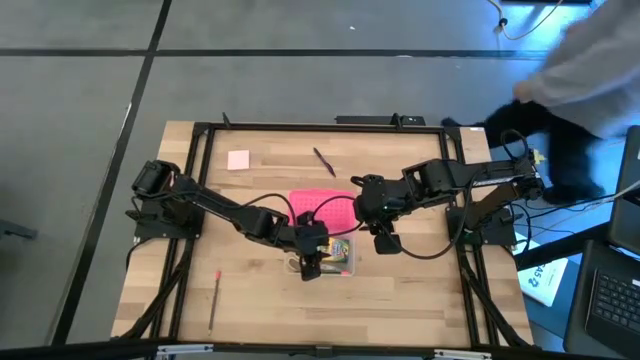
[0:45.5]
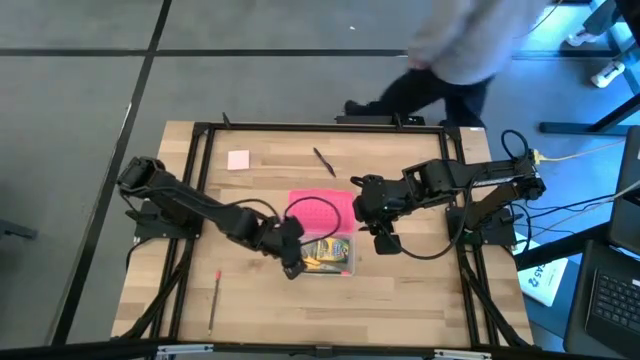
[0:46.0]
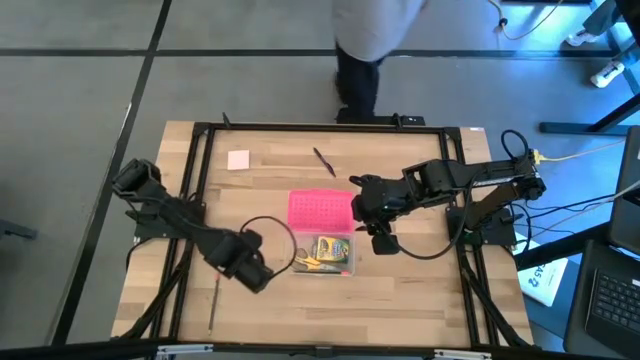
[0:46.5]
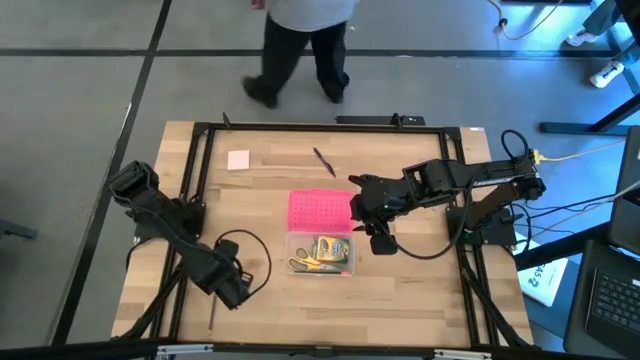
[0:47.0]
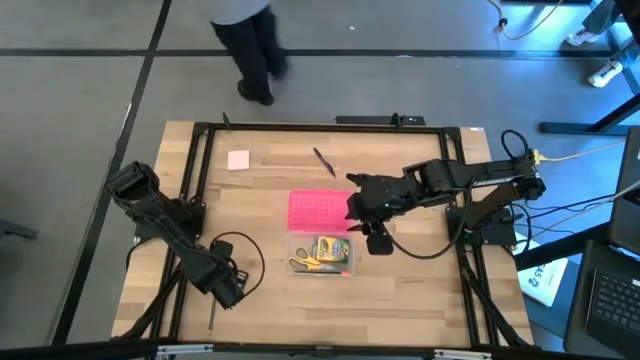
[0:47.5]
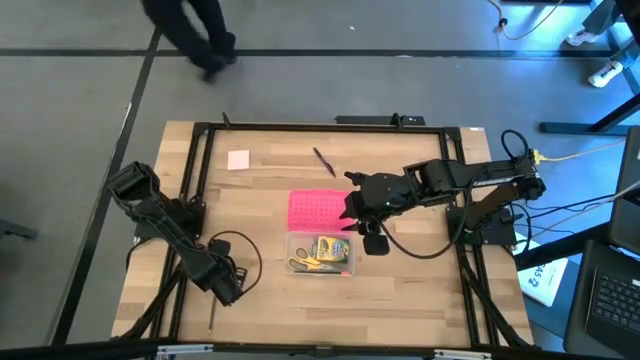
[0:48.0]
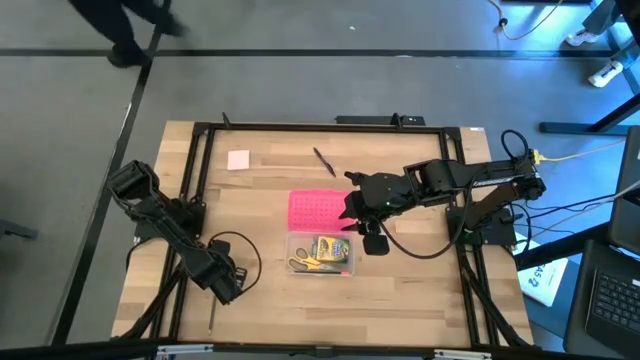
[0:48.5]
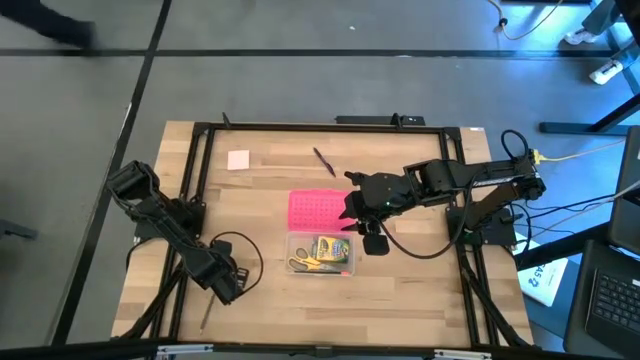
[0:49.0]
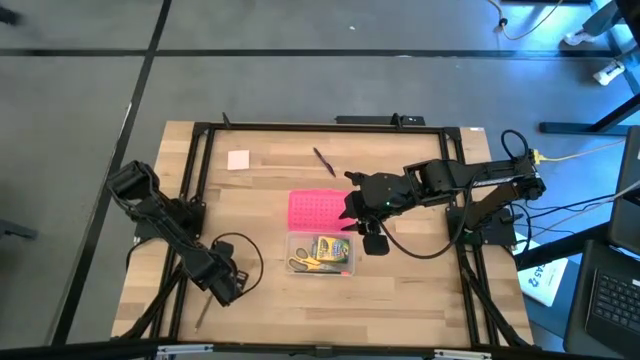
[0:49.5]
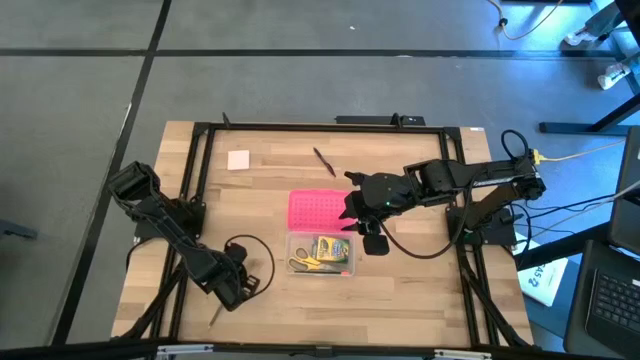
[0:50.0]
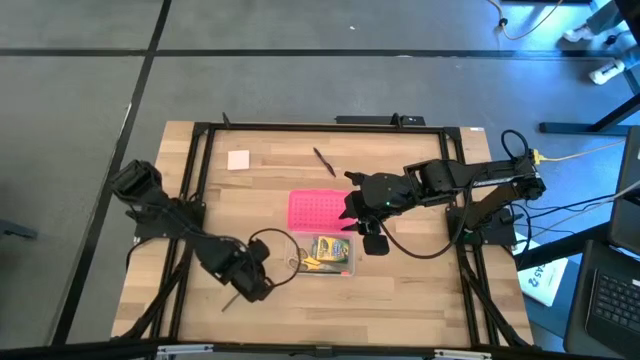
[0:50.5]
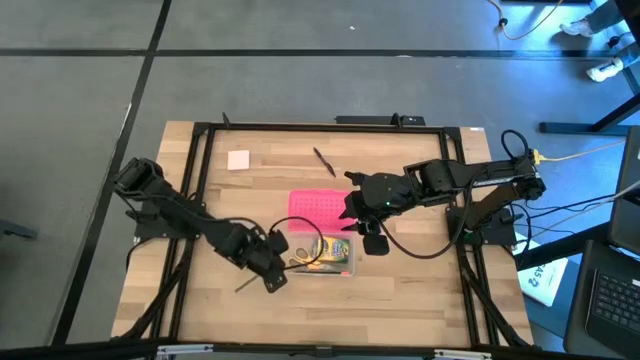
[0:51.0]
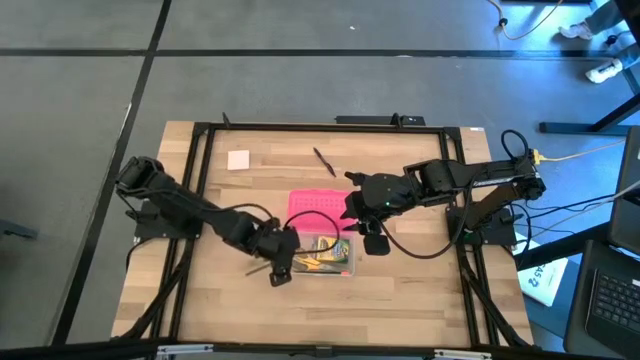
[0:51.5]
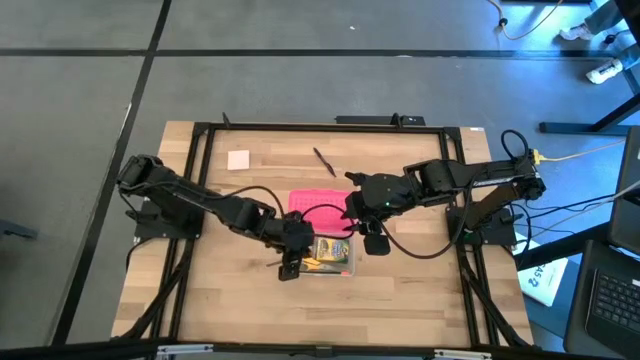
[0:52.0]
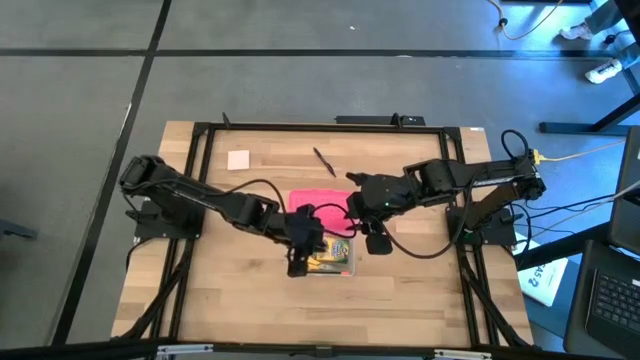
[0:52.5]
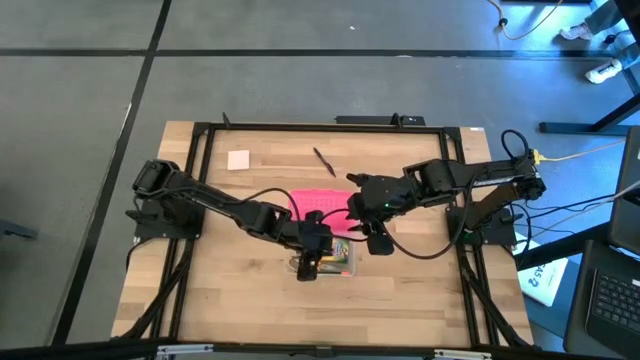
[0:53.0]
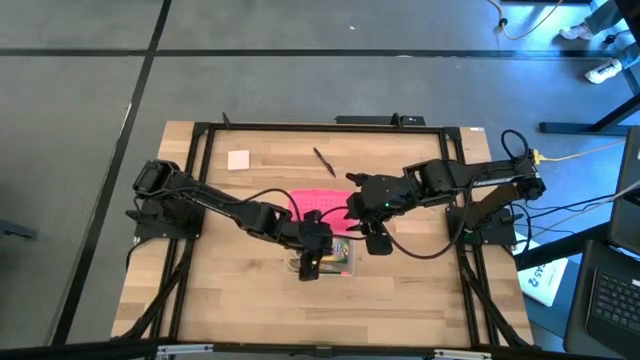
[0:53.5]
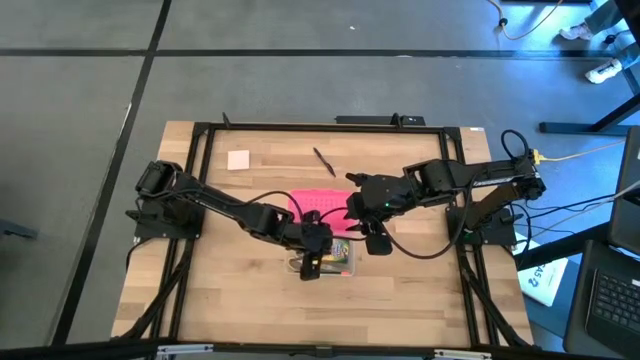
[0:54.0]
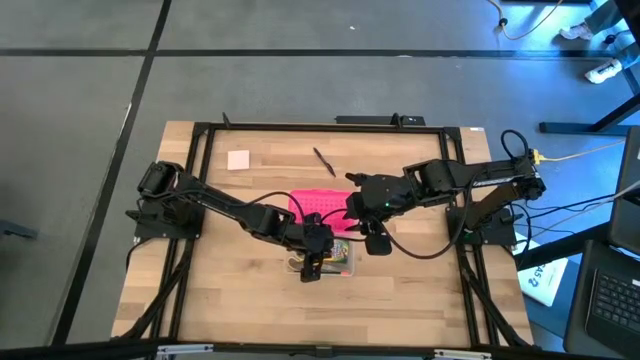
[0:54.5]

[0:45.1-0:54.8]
Task: Pack school essentials
Put the black pencil into the pink supply box

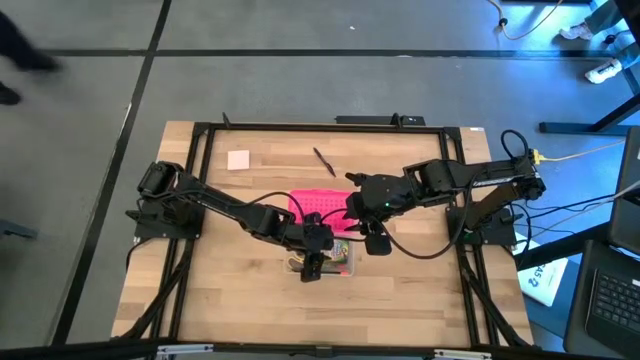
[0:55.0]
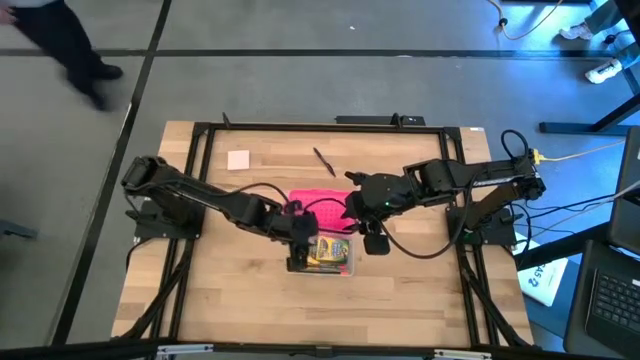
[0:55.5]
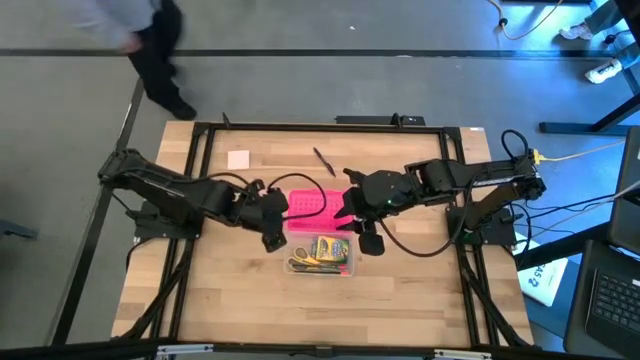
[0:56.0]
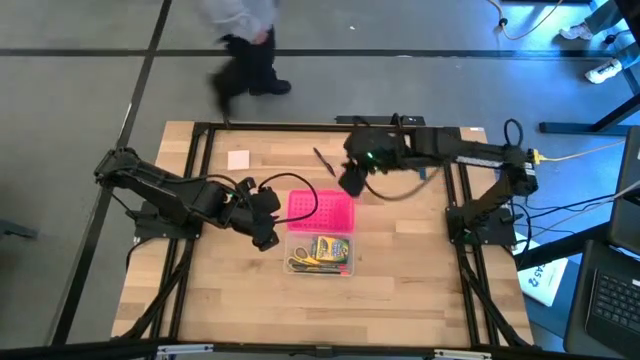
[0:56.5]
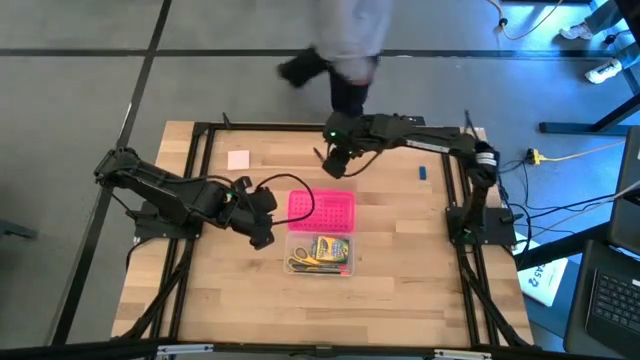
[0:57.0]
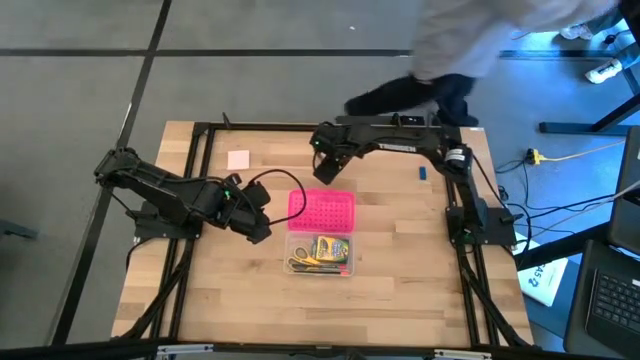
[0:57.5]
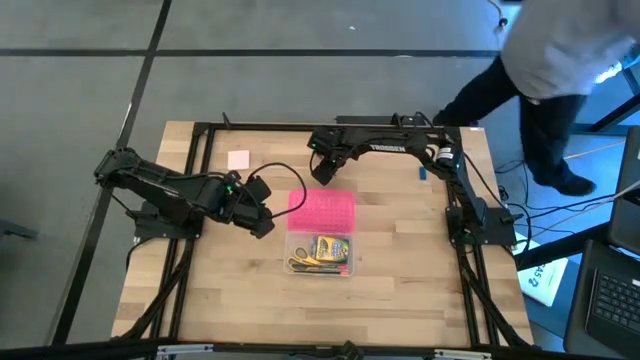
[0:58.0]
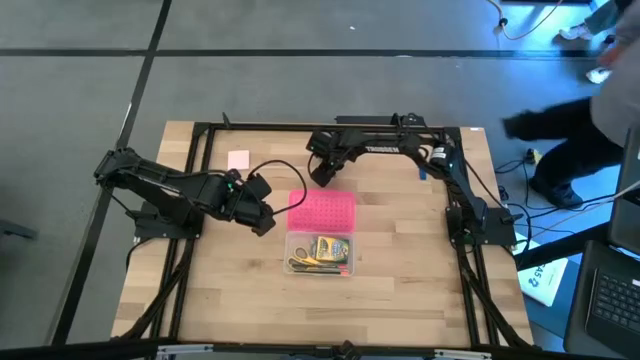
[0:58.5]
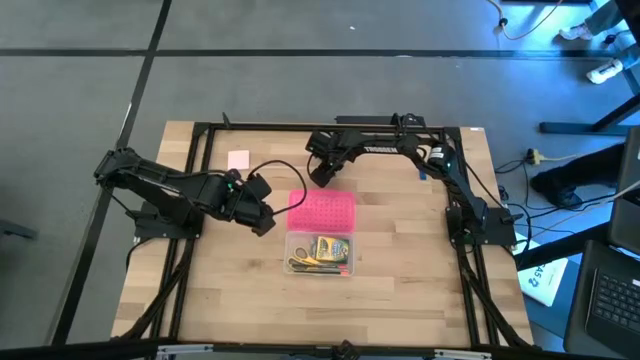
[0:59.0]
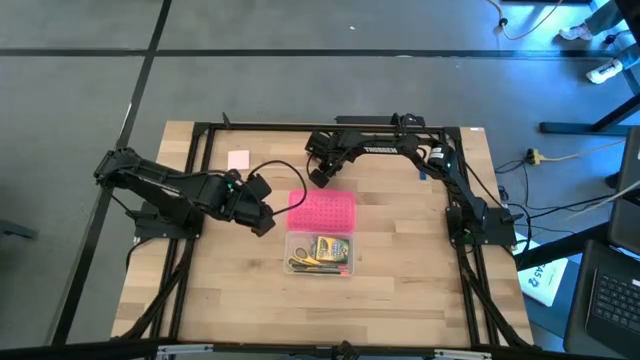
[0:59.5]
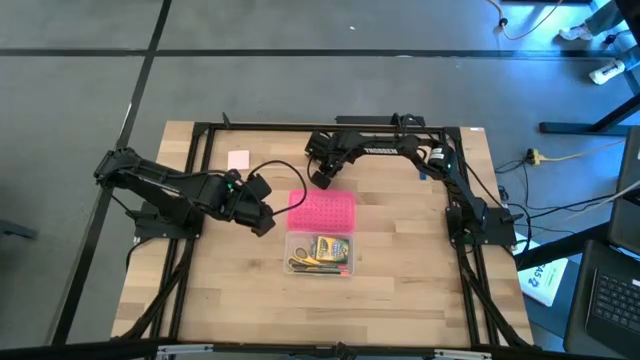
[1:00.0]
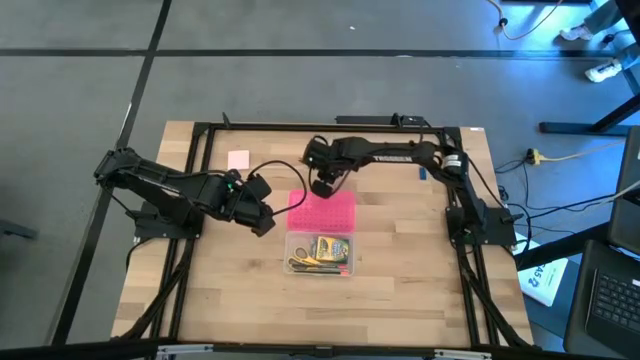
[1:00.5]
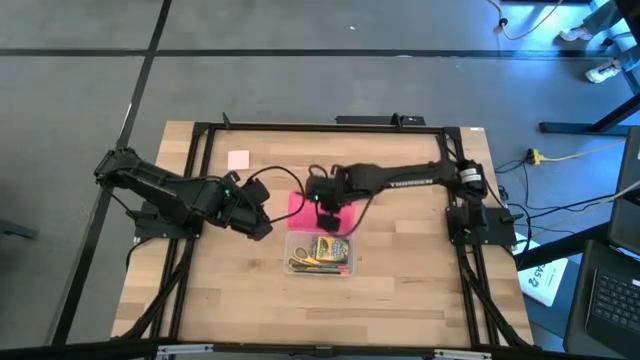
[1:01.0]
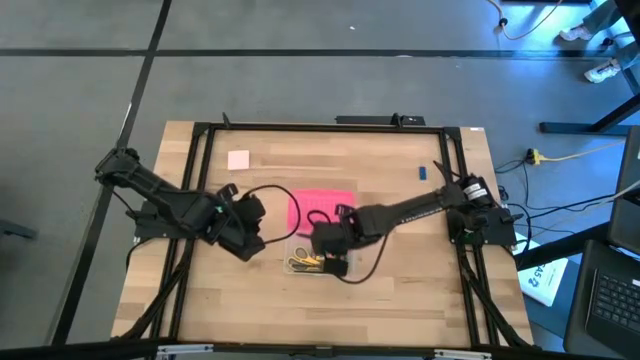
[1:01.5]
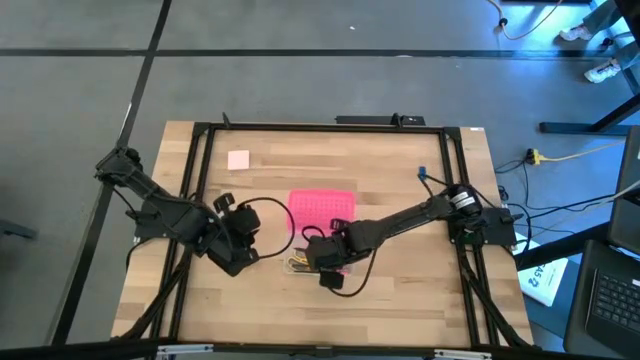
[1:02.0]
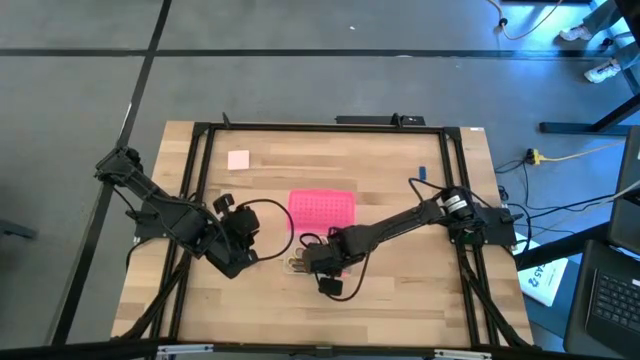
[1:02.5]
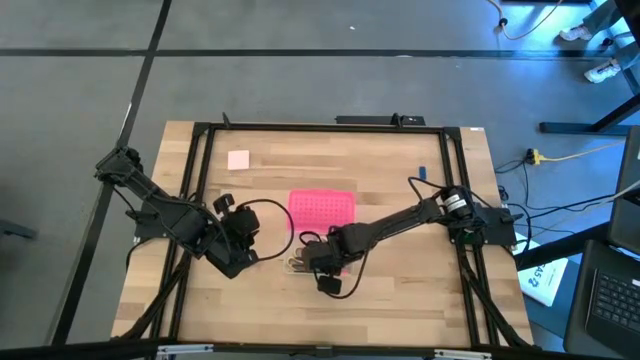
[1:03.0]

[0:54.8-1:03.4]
Put the violet pen into the pink supply box

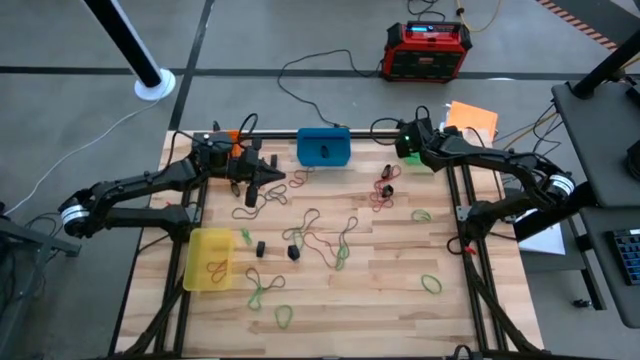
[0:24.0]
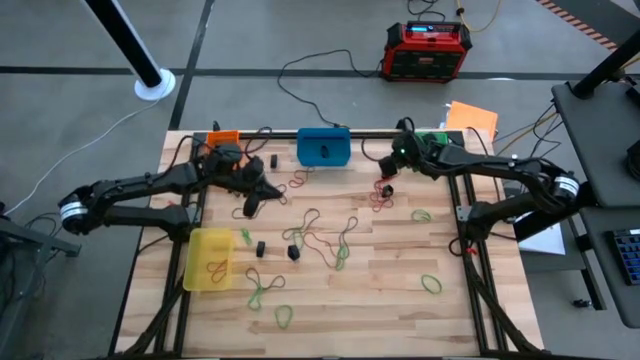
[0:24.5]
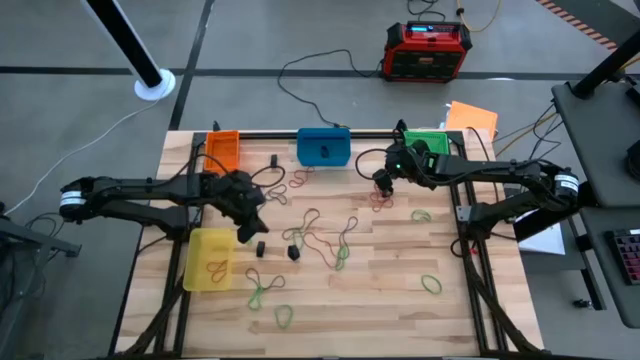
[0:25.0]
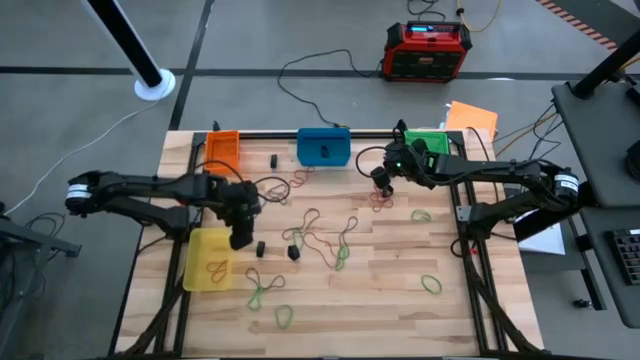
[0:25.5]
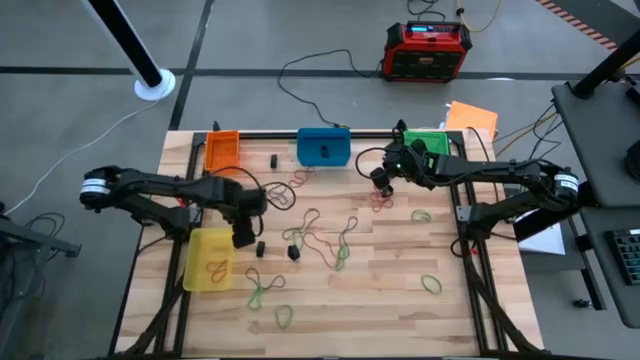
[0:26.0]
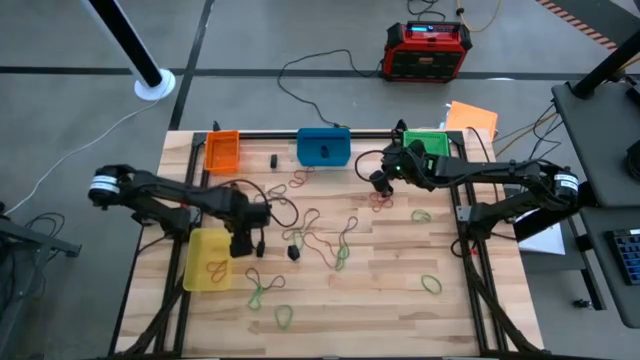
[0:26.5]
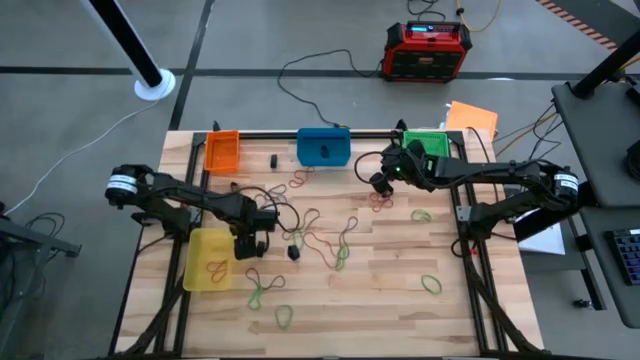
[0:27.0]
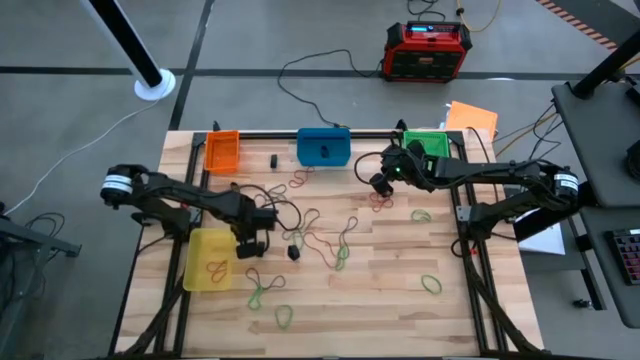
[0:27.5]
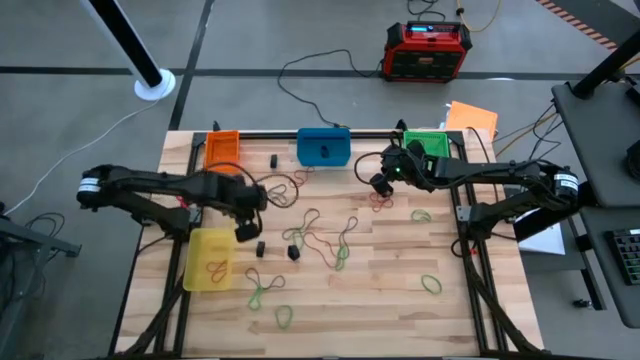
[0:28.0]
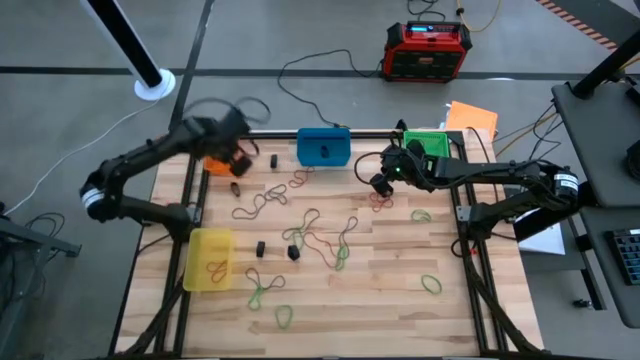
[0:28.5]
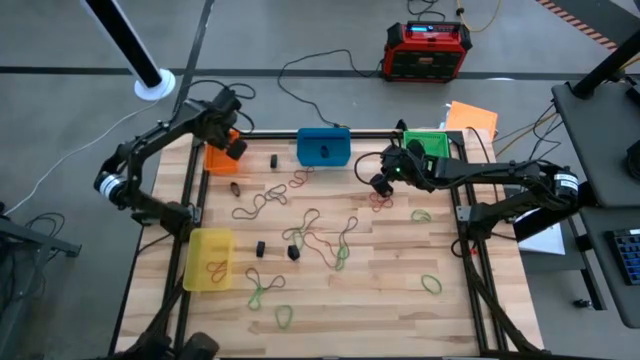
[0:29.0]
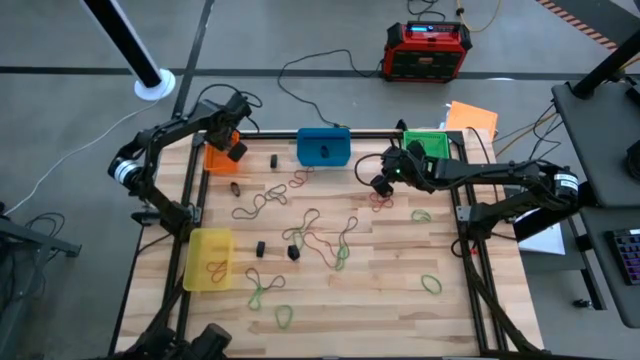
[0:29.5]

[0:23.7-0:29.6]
Task: Sort rubber bands into baskets
Put the green rubber band into the orange bin
